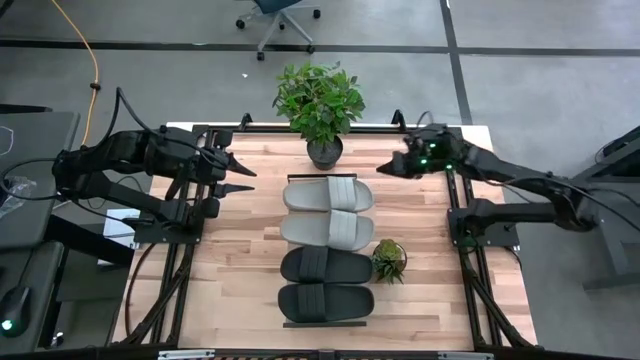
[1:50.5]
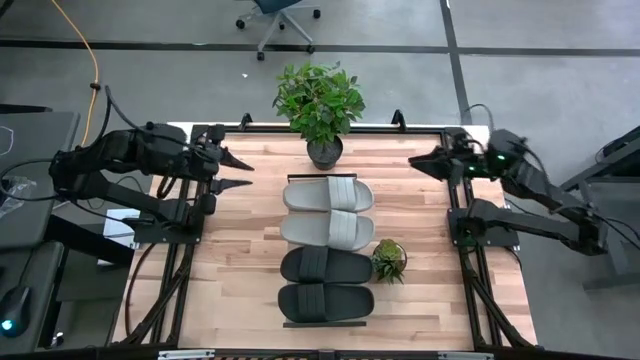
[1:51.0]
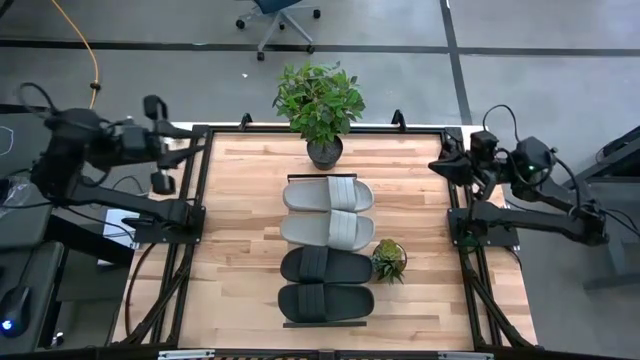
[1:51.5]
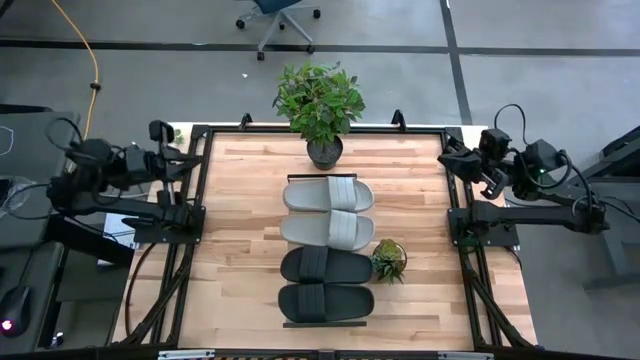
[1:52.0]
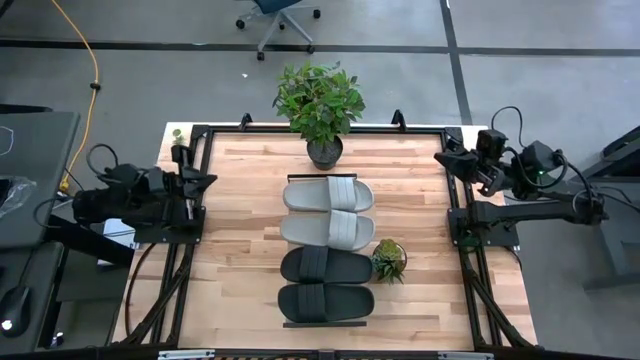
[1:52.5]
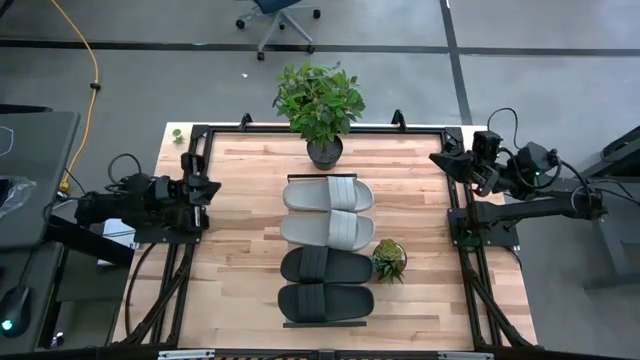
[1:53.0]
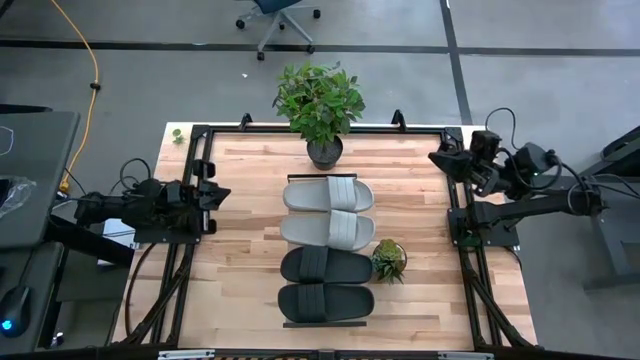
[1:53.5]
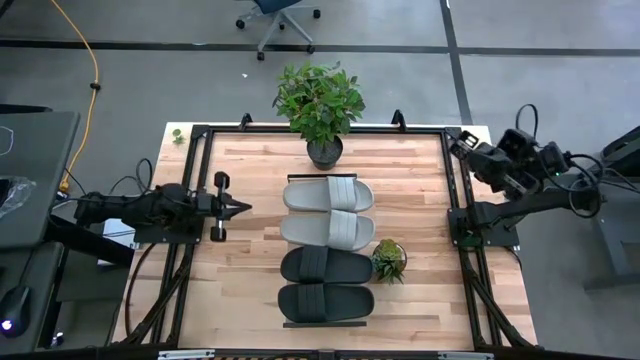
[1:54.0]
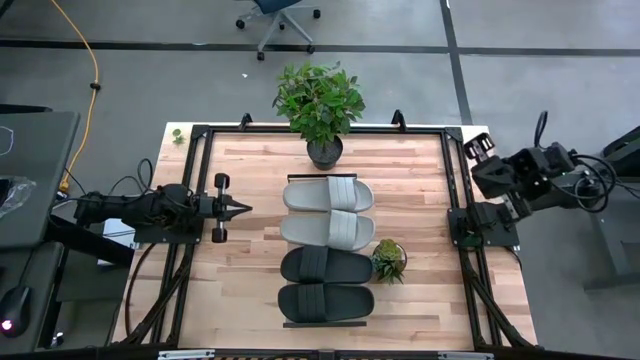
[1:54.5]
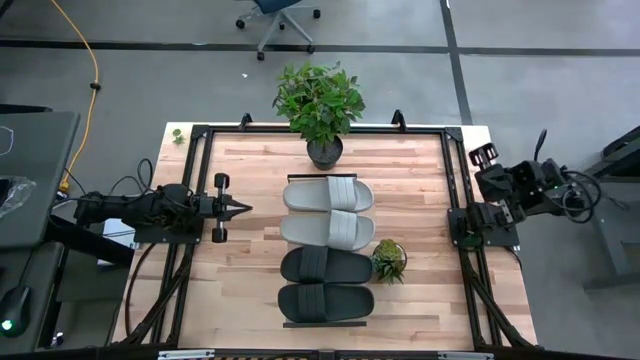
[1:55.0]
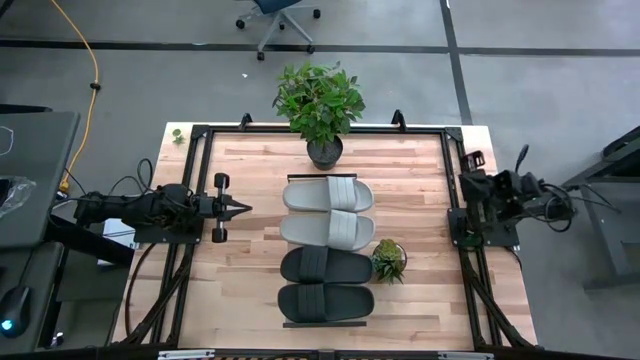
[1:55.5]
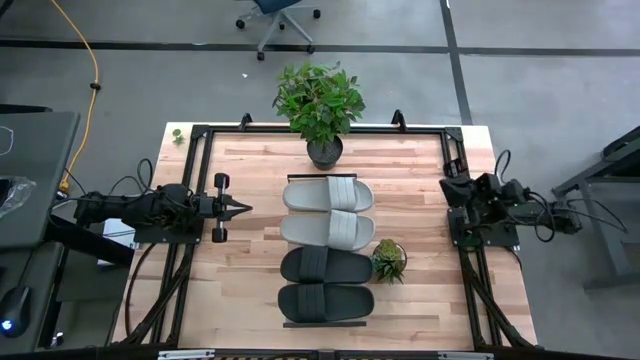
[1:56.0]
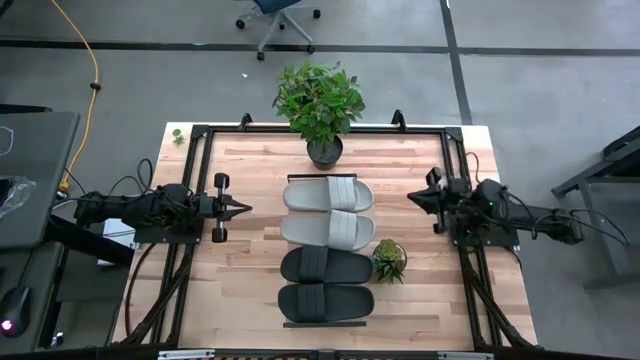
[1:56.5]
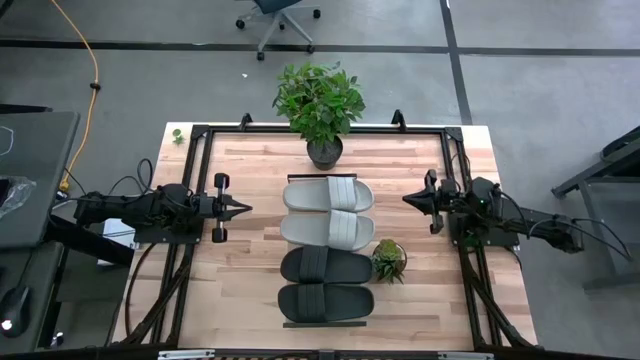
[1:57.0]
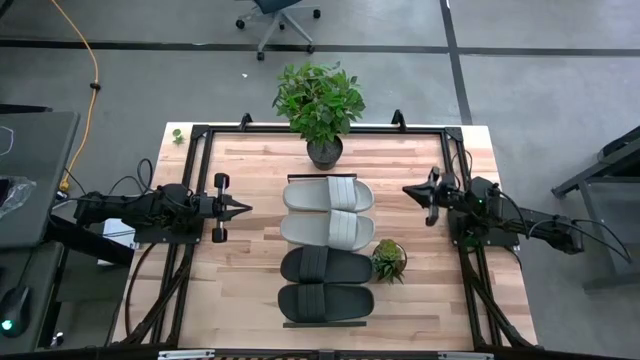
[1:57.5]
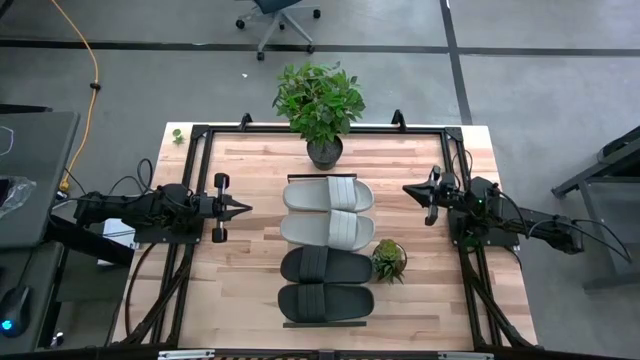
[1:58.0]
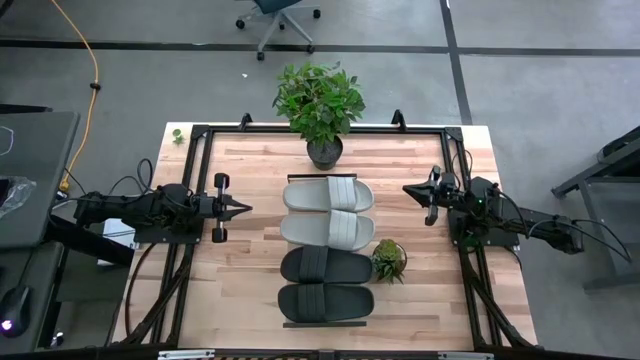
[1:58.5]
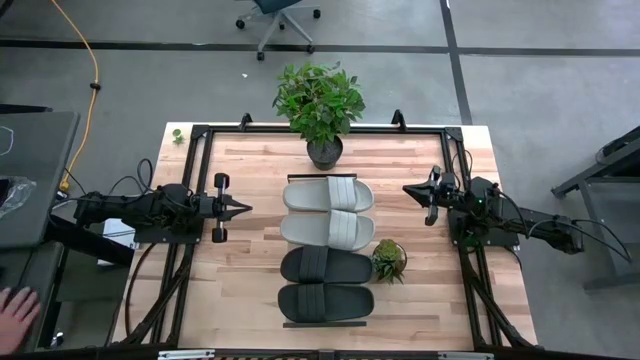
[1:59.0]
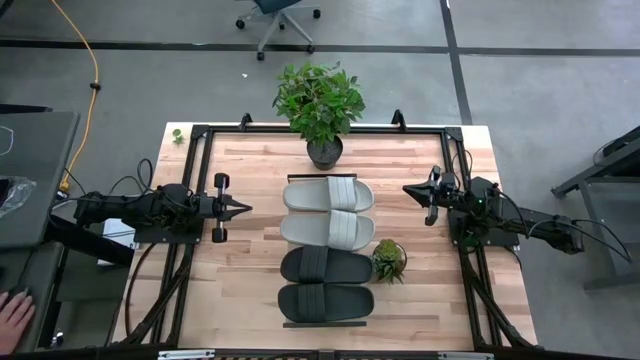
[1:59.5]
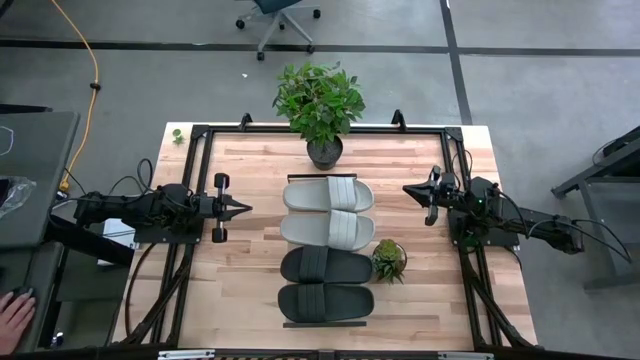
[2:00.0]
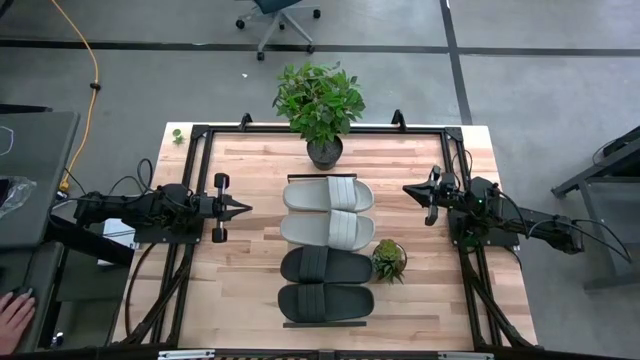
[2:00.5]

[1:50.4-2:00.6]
Task: Pick and place slides into the shelf
Return to Home Position

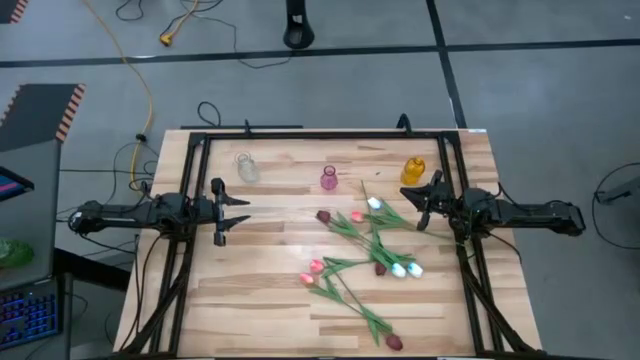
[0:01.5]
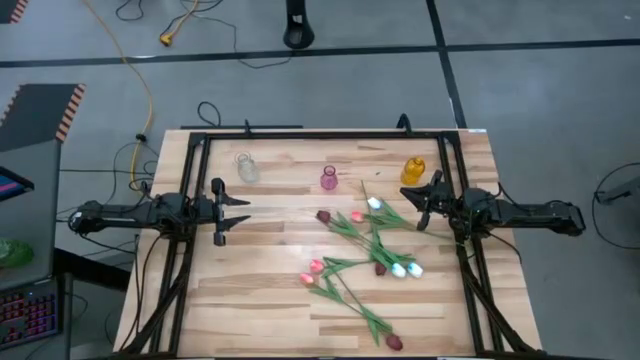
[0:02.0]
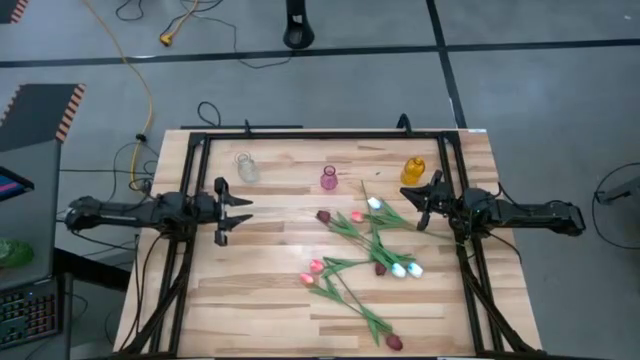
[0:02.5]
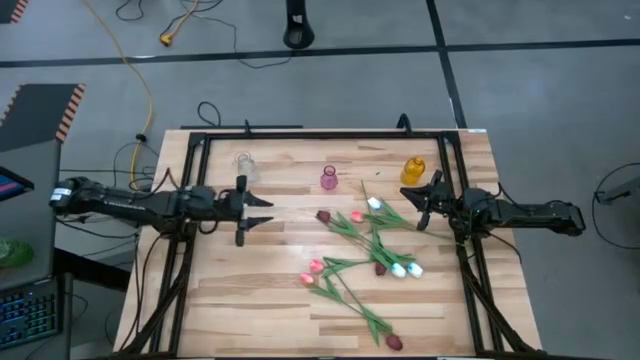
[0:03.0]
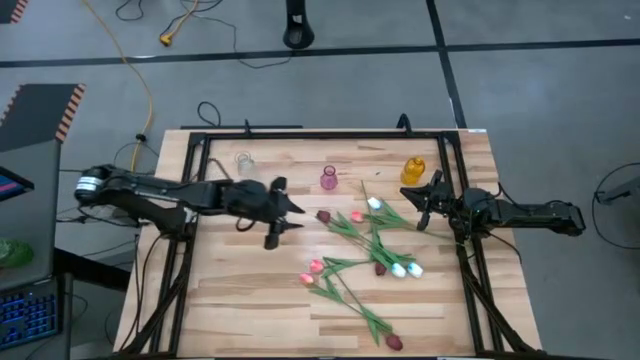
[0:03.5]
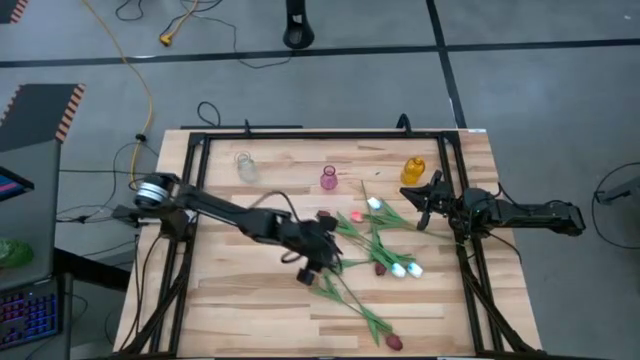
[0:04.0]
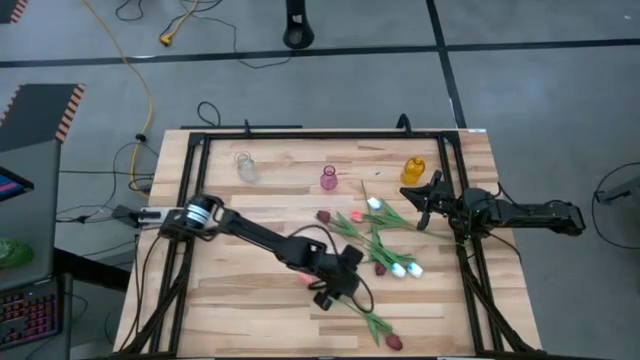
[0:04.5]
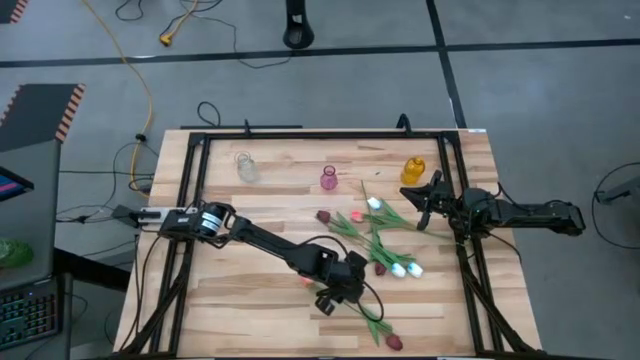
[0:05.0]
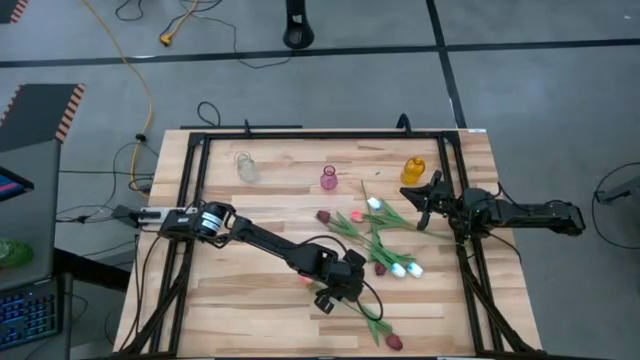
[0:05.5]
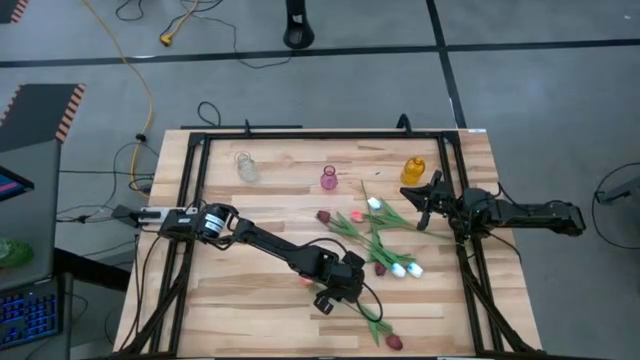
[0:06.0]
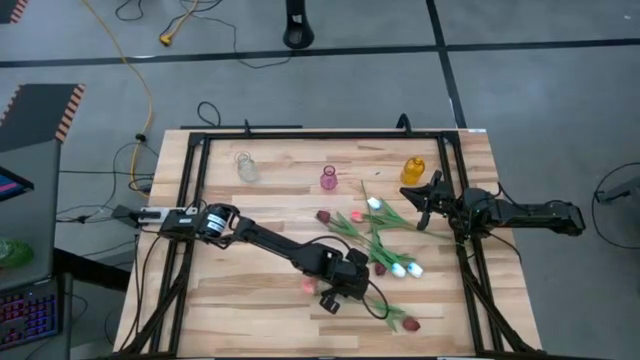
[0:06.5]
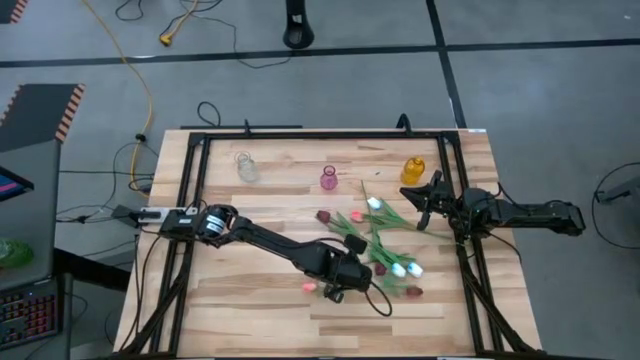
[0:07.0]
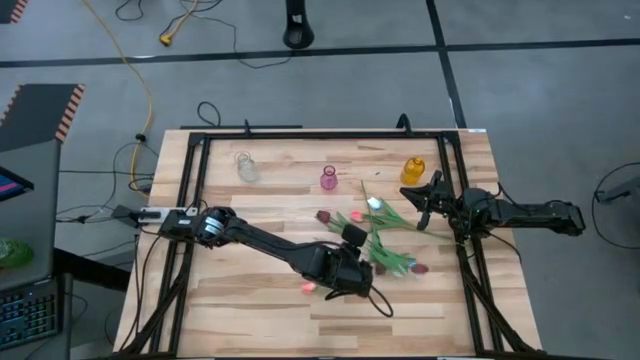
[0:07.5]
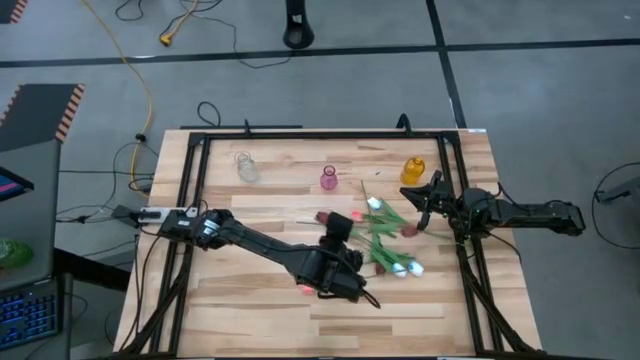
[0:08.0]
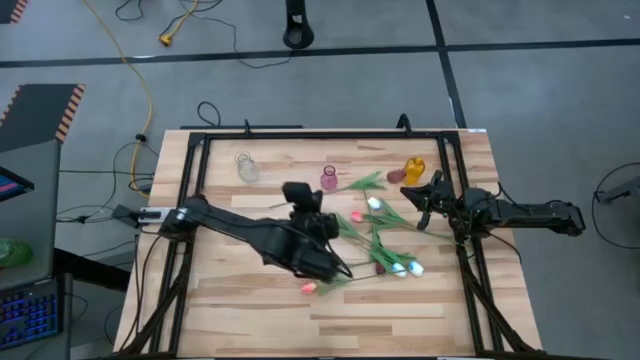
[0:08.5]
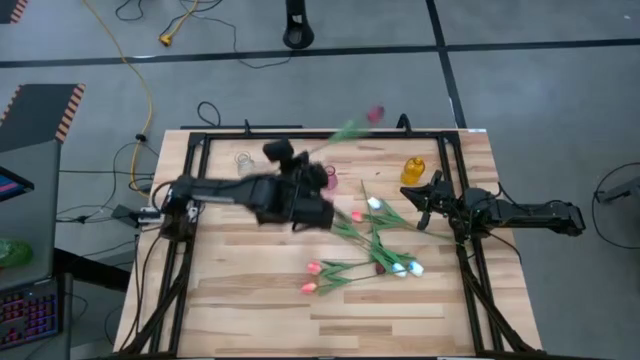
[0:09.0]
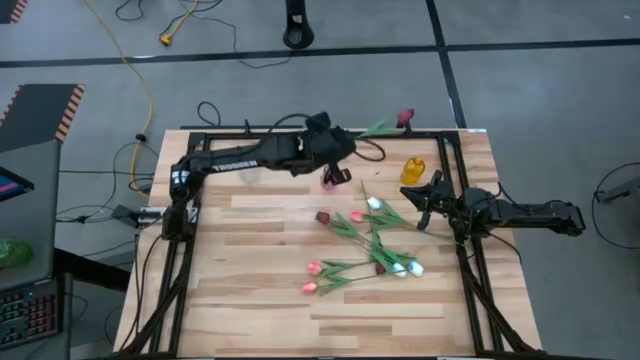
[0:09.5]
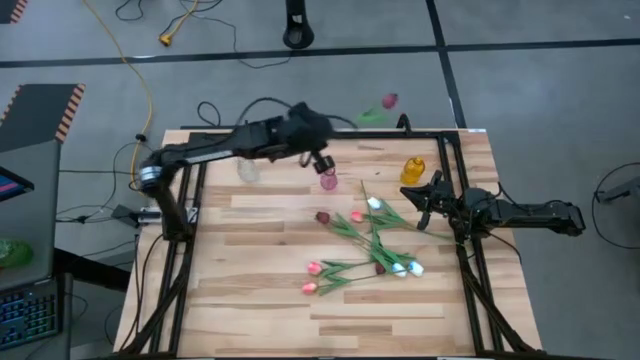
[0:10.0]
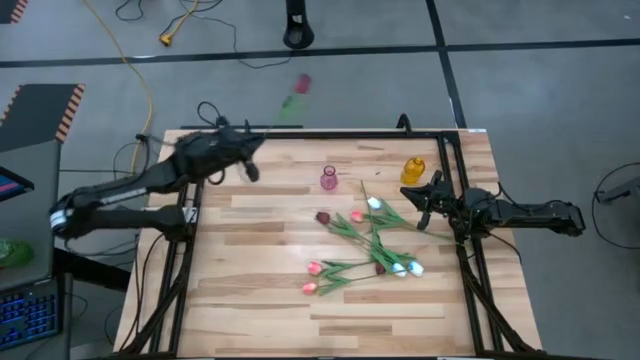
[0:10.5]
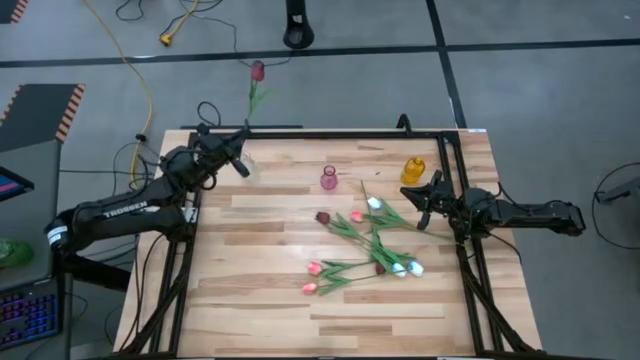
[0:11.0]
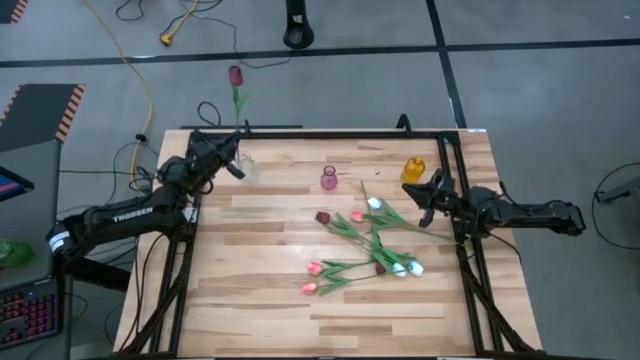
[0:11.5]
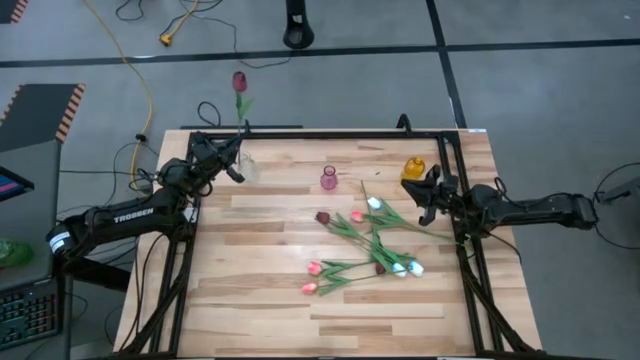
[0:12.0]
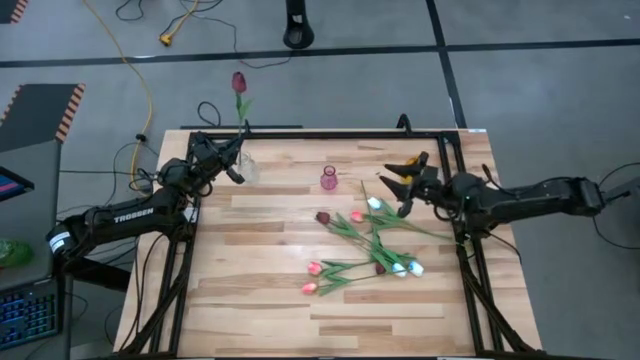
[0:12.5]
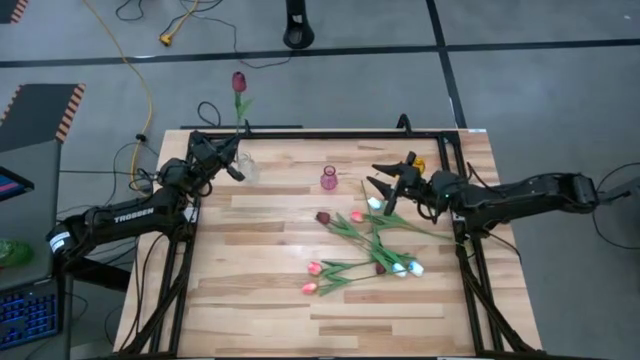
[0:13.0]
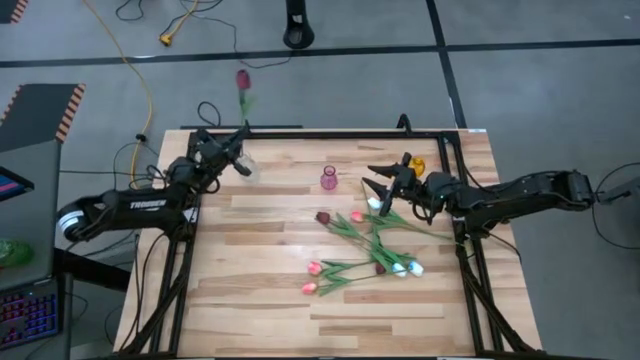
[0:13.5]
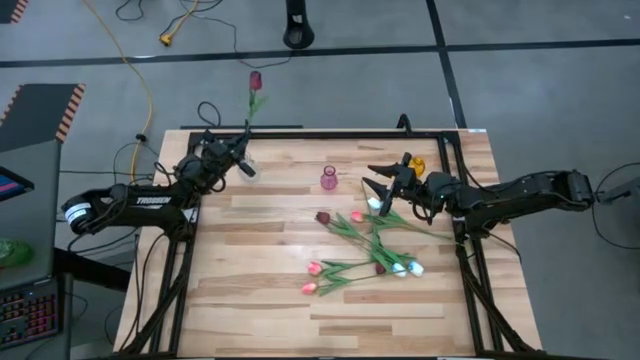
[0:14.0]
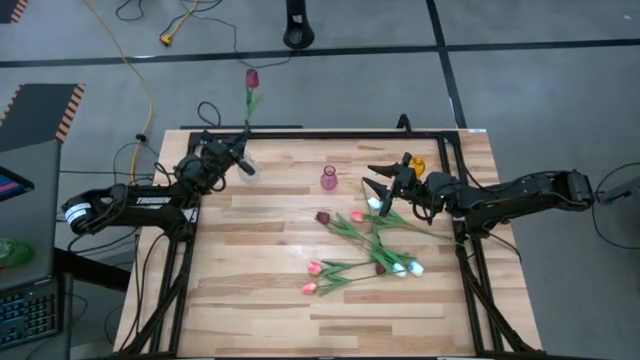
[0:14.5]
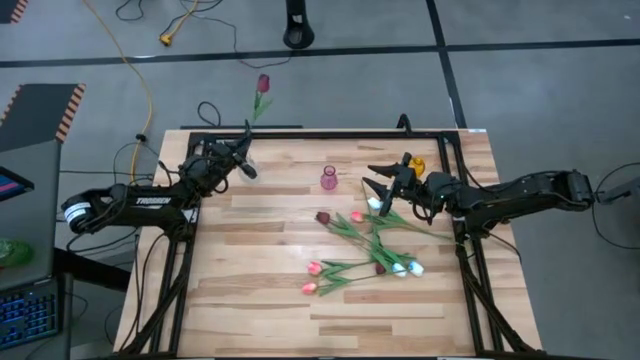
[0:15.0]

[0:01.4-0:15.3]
Task: Sort flowers into vase by color
Put the bottom red flower into the transparent vase
